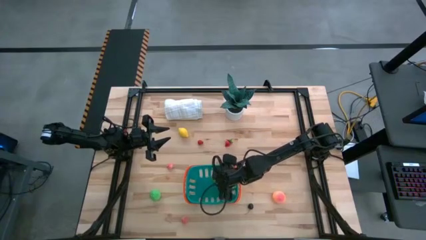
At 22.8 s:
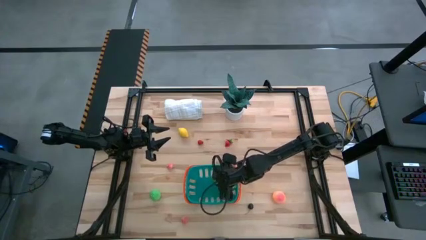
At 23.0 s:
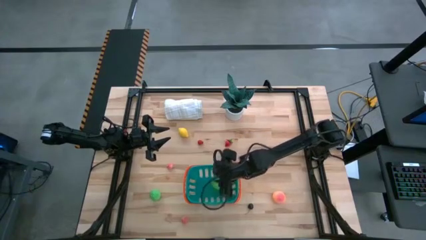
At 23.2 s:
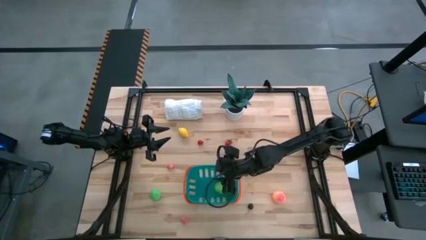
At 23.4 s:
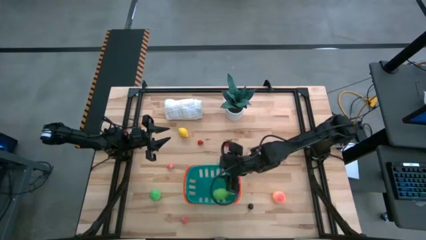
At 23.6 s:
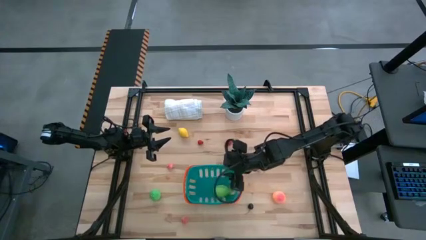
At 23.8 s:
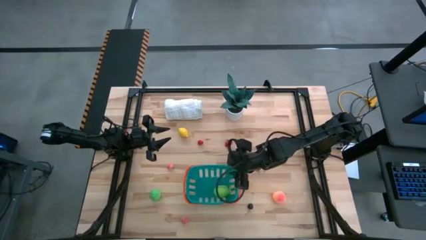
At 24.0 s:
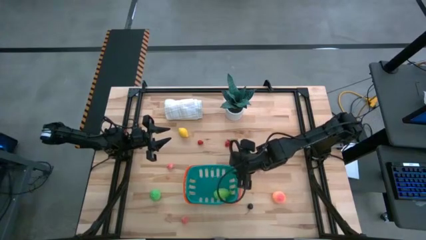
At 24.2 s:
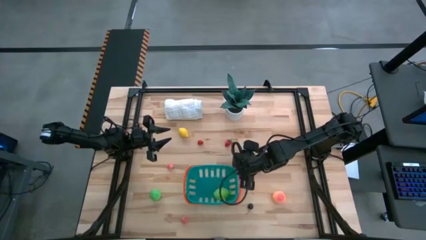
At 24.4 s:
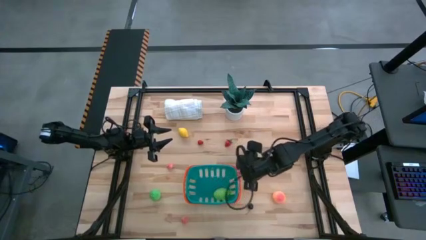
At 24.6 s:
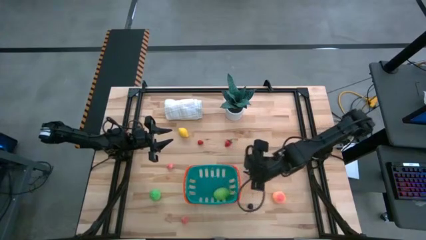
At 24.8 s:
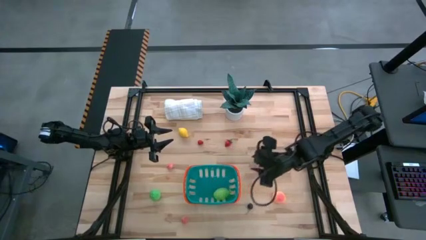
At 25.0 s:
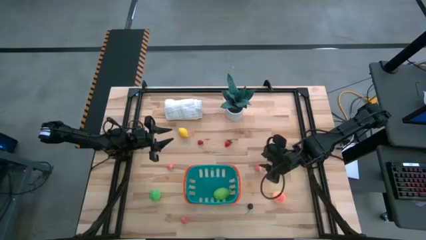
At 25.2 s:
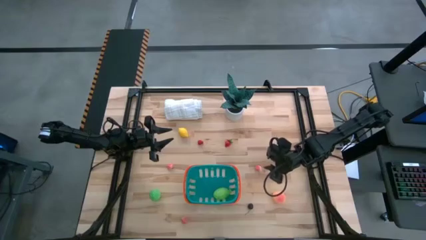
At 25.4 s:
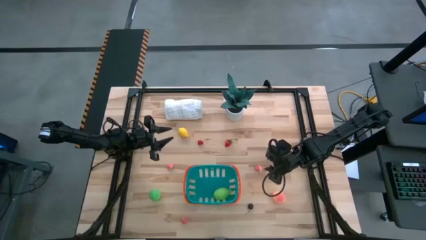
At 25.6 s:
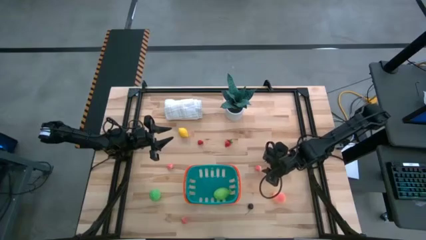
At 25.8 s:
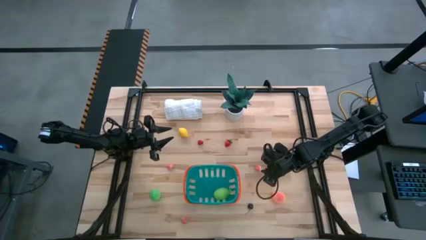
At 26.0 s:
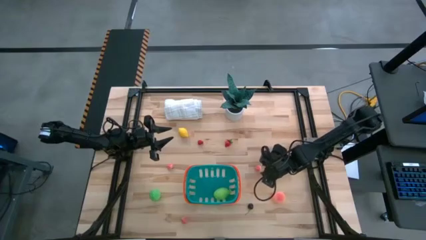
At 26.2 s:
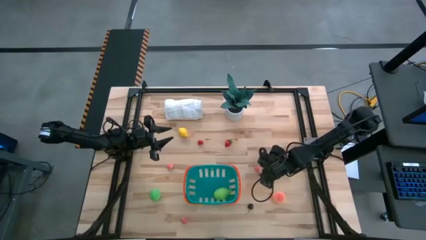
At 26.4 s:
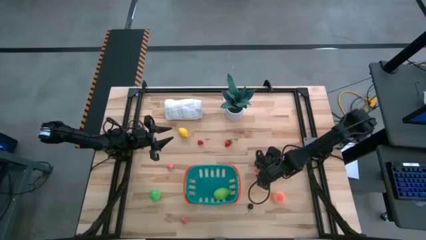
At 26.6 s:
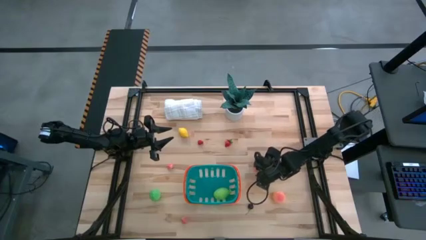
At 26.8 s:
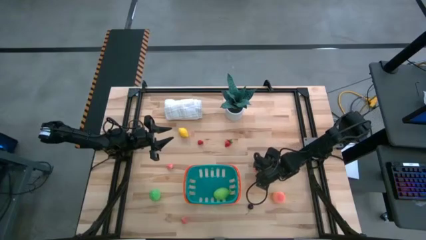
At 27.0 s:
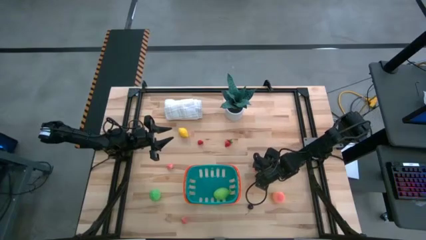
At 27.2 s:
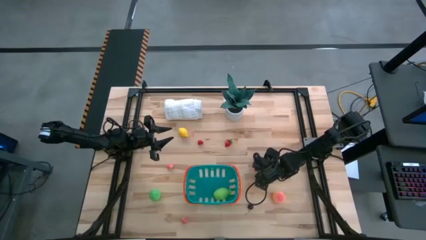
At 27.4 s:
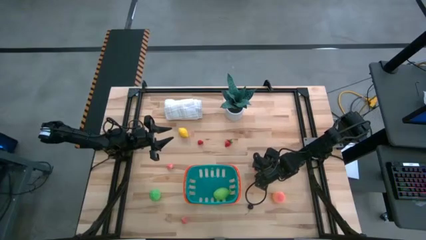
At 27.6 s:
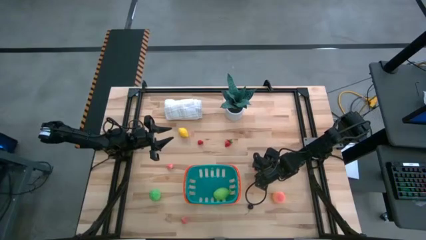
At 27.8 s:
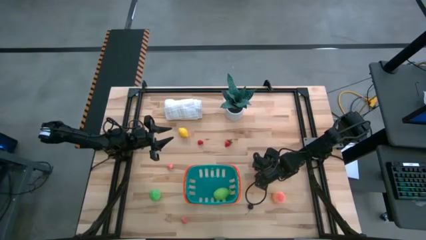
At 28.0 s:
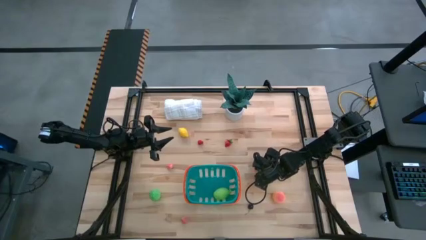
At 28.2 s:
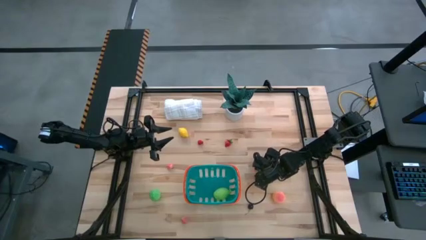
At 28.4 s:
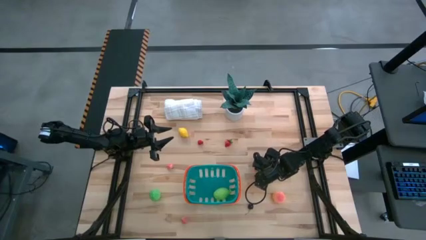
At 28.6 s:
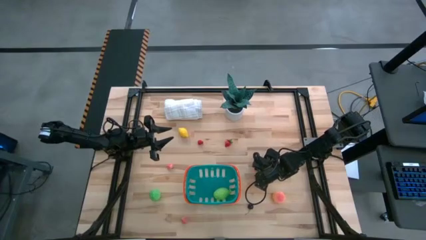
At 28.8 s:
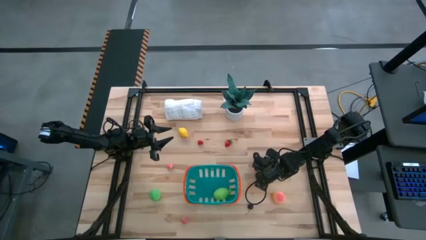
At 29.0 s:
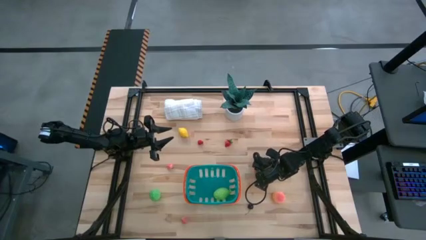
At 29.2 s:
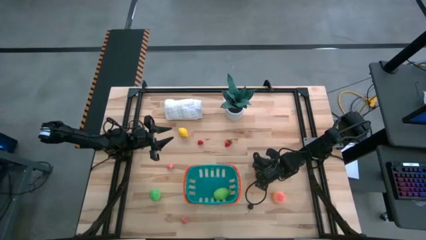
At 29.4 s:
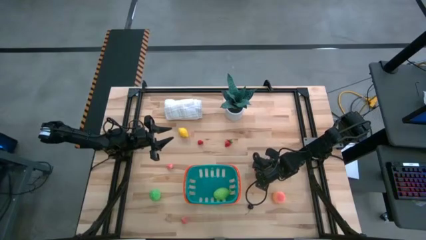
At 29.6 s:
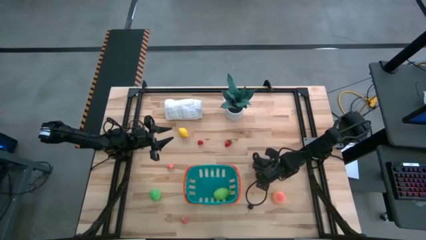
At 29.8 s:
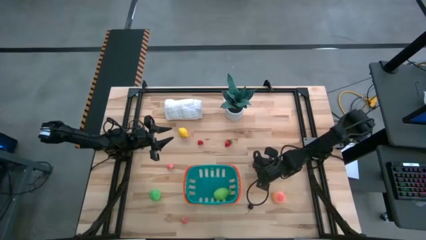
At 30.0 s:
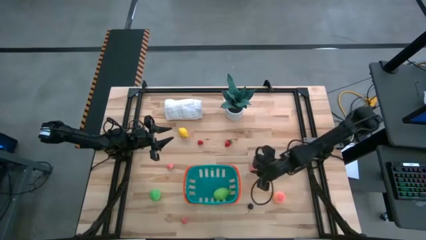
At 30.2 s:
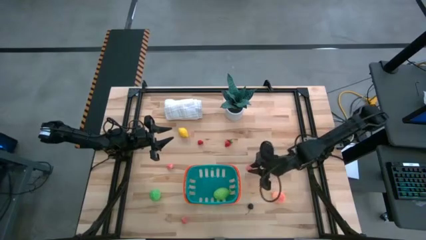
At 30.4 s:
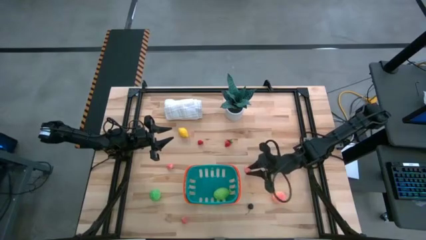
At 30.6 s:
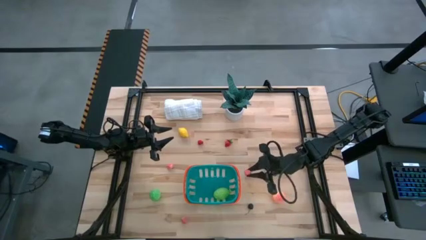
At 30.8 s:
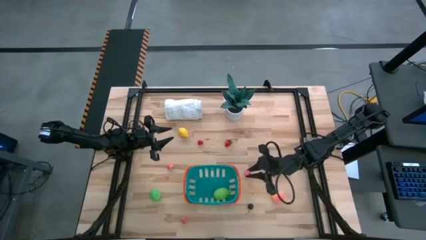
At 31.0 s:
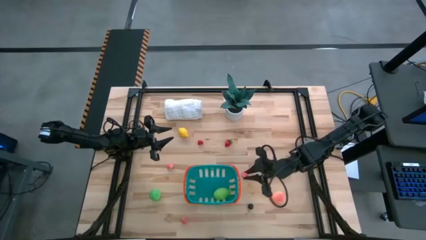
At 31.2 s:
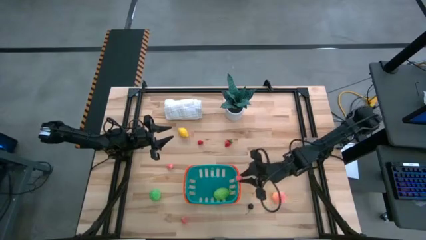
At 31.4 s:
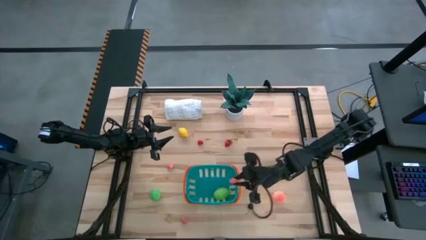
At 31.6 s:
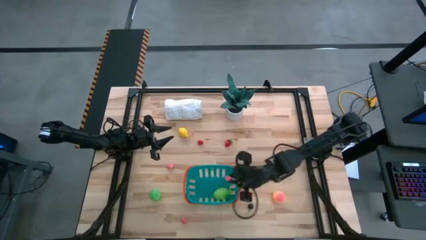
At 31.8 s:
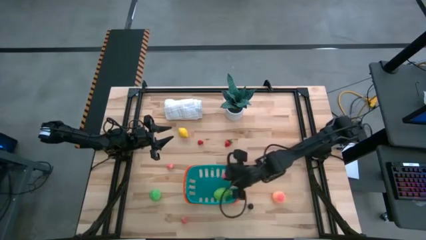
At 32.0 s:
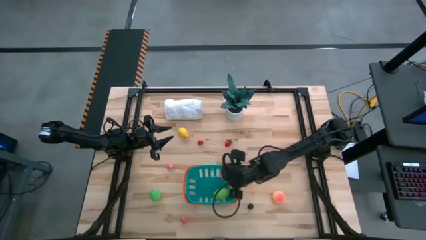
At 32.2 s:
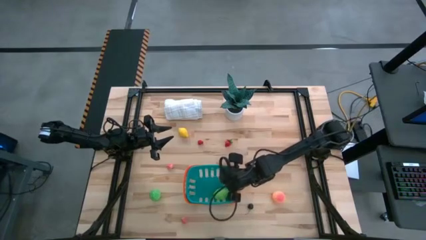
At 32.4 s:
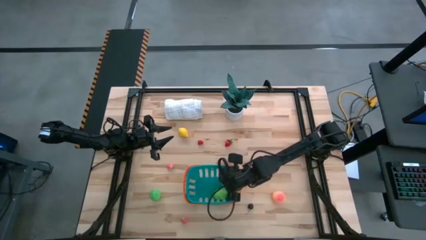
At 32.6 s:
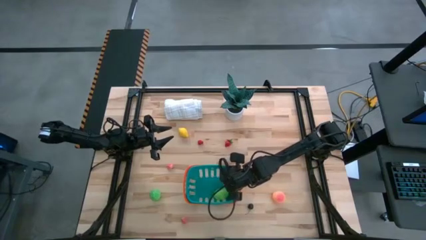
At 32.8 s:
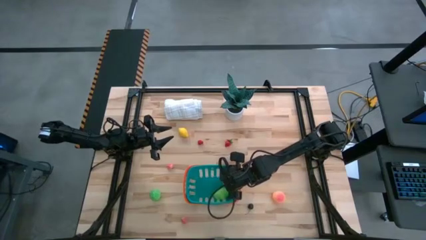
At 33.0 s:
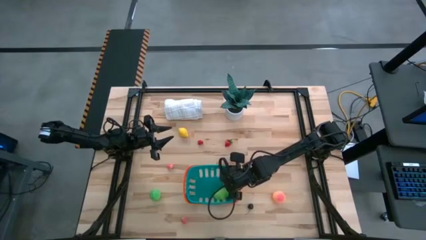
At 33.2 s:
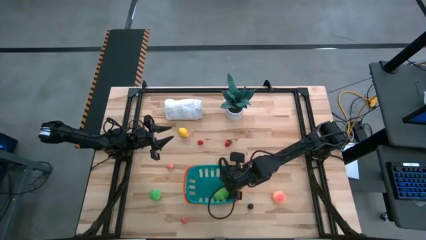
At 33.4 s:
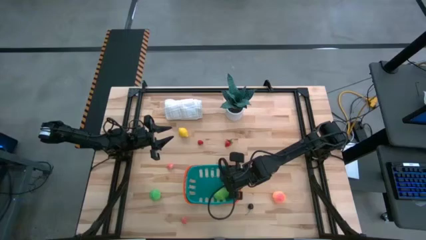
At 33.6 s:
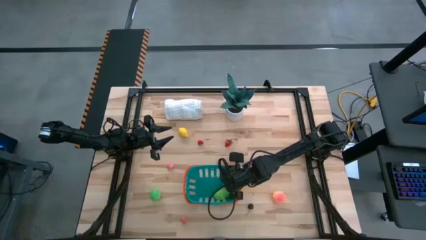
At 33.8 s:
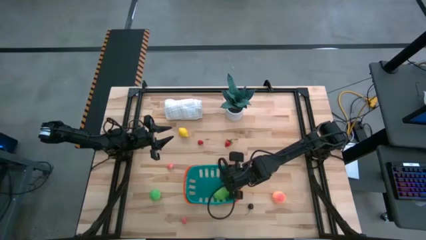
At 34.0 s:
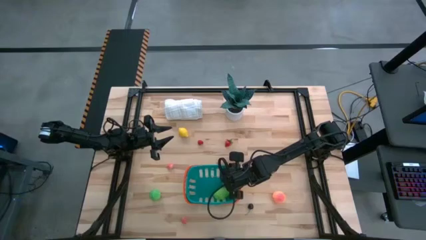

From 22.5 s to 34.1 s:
Task: Pick and placing Produce into tupperware
Put the top right small pink peach into the blue bin
